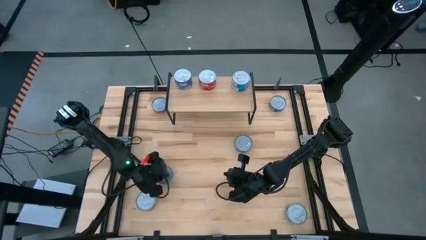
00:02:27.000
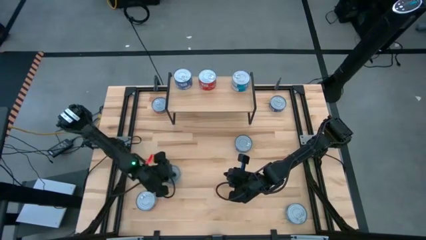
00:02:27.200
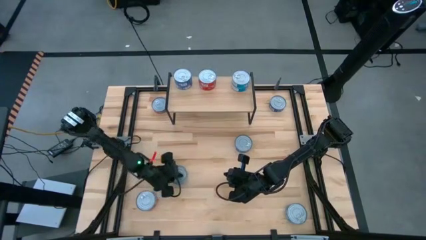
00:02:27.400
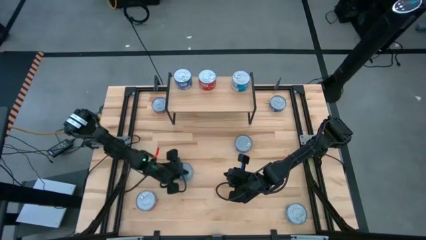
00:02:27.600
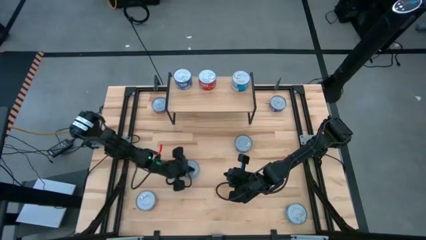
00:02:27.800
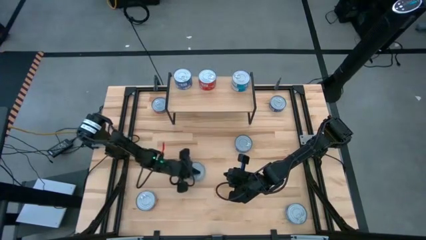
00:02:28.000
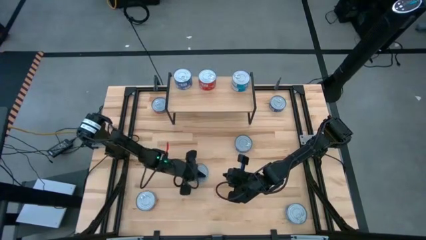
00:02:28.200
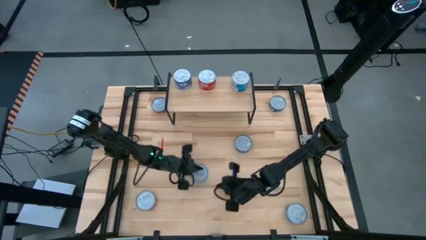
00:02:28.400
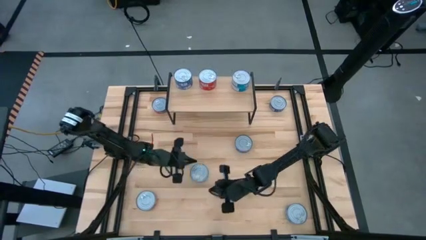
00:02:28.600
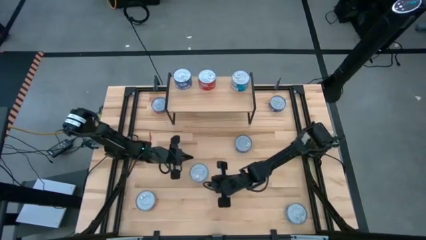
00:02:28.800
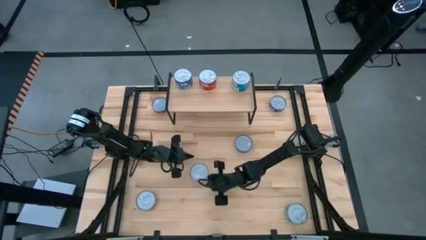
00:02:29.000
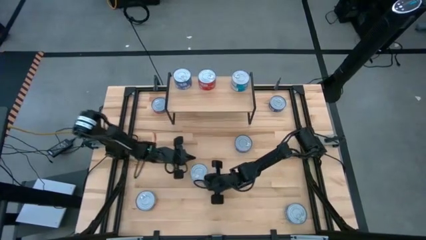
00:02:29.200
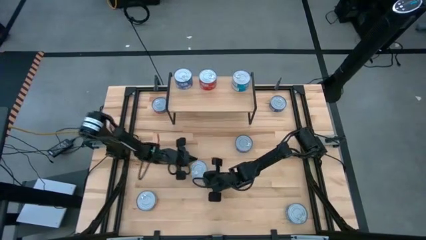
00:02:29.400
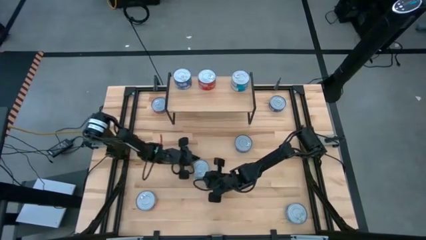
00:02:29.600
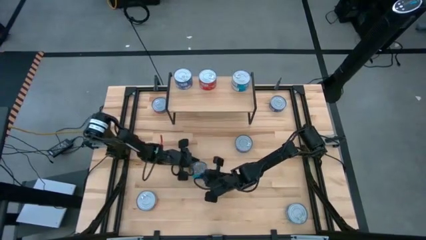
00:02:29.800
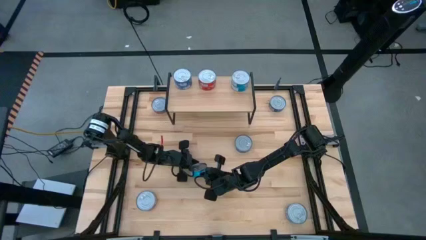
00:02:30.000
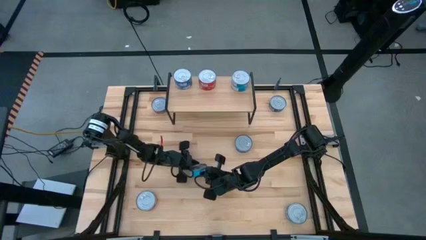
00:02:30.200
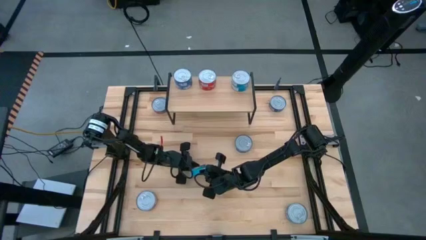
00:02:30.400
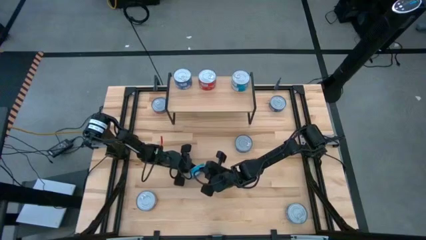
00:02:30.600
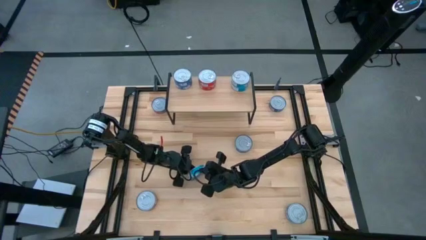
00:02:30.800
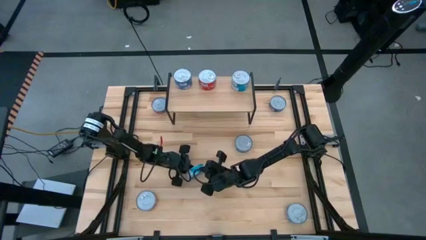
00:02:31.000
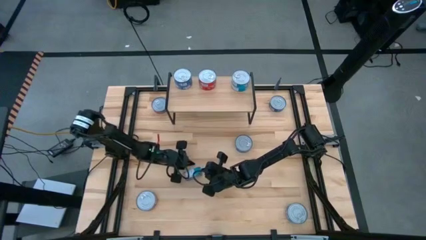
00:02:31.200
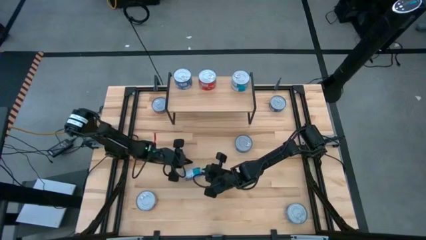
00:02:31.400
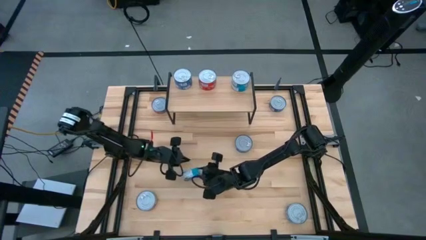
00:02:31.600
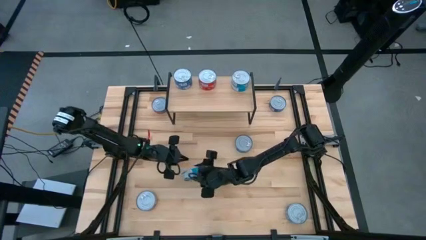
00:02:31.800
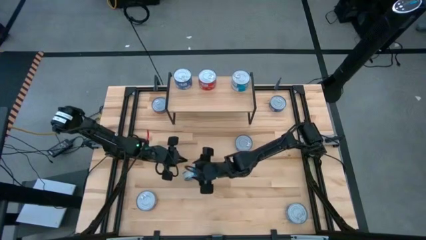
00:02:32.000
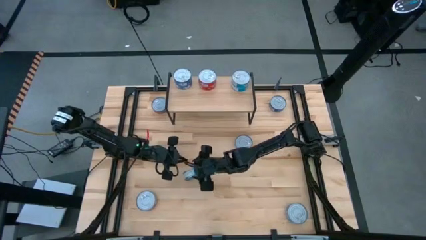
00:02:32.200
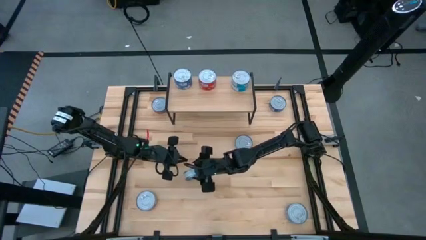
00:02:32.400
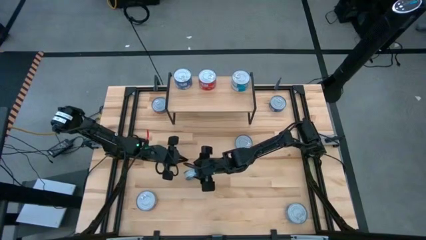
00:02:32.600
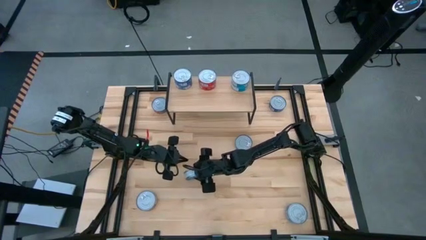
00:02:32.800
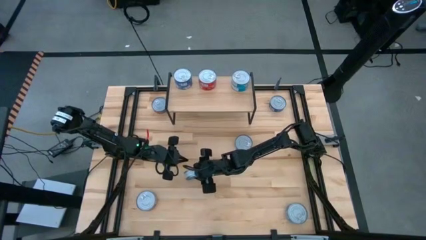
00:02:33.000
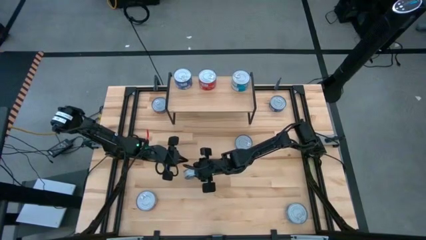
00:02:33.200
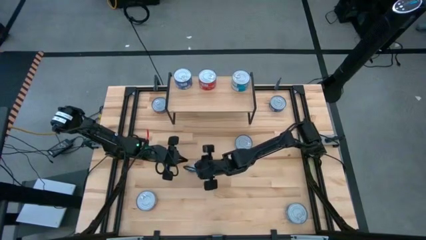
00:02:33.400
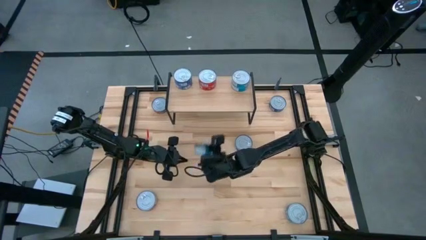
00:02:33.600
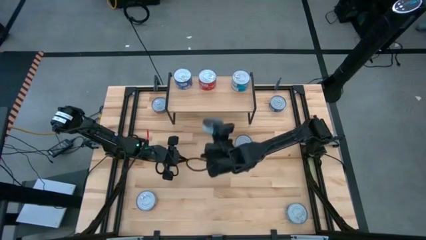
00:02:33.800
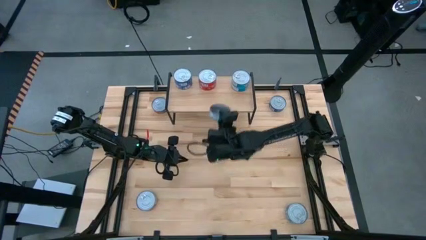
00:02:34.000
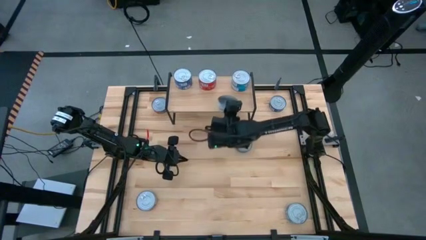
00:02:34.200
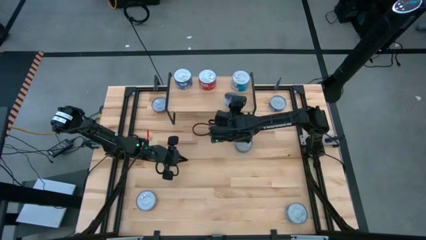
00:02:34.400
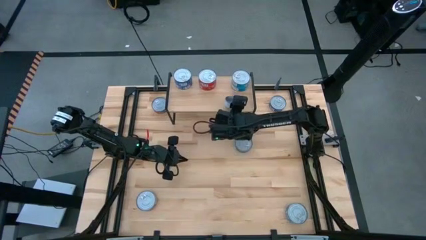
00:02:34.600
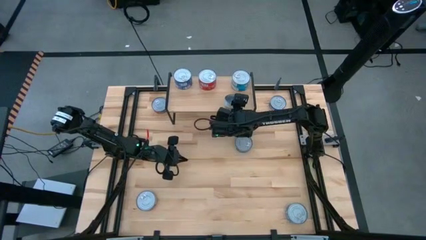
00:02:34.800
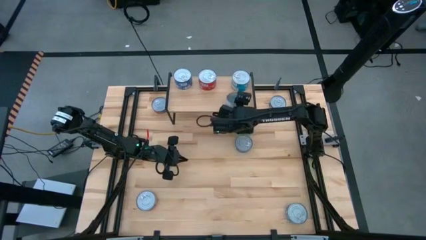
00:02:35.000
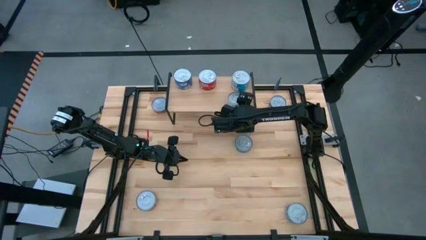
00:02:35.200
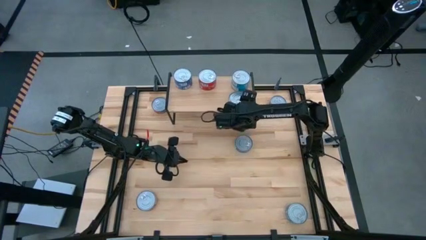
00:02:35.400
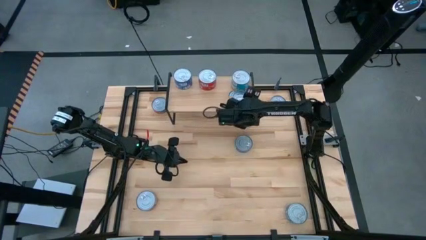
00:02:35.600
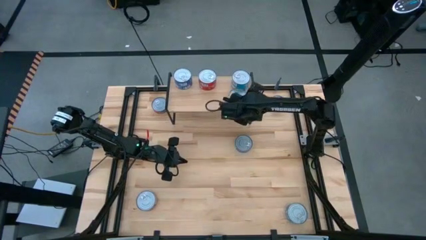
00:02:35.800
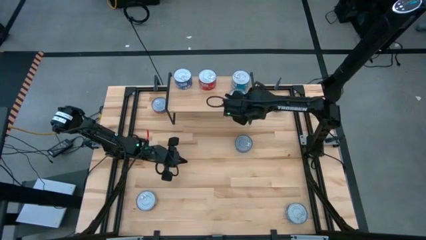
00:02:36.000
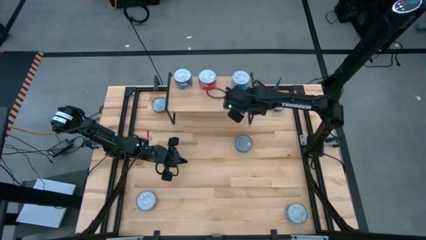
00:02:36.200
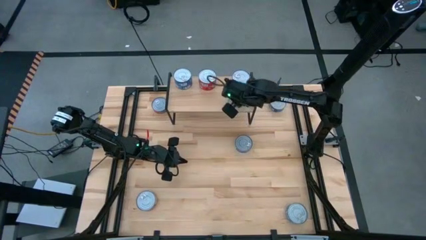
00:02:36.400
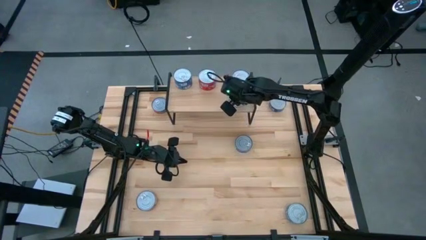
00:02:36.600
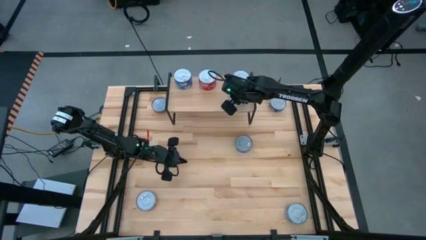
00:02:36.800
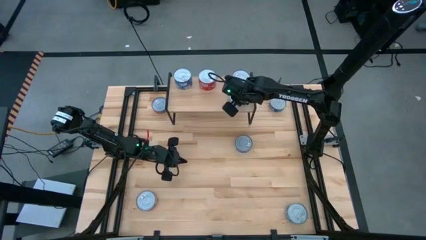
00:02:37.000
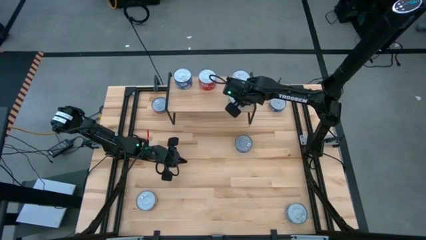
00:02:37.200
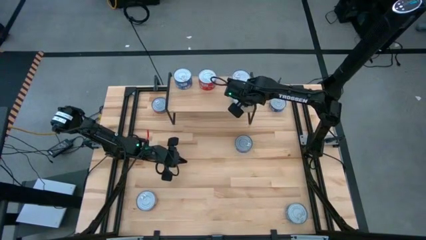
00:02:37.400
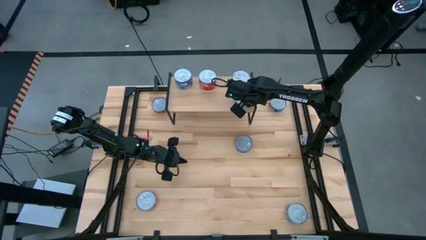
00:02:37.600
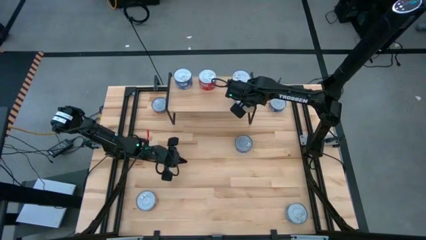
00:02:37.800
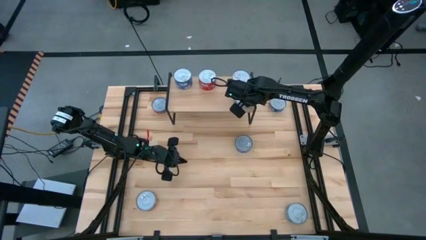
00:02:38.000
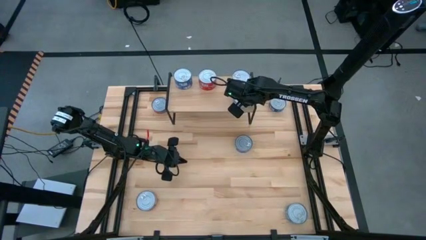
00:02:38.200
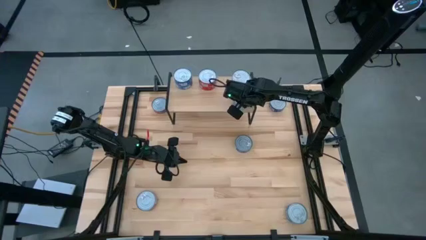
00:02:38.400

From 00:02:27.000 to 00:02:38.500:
Task: Stack canned seafood by type on shelf
Put the yellow blue tuna can on the shelf aligned with the other yellow blue tuna cans

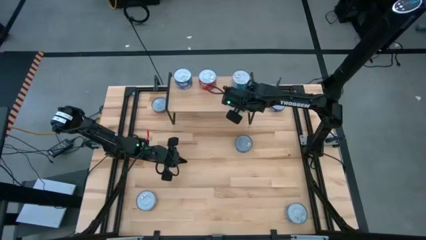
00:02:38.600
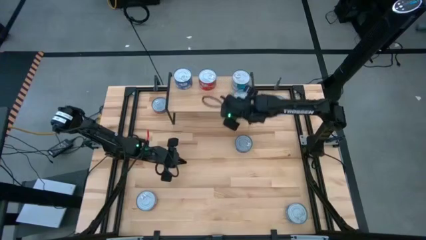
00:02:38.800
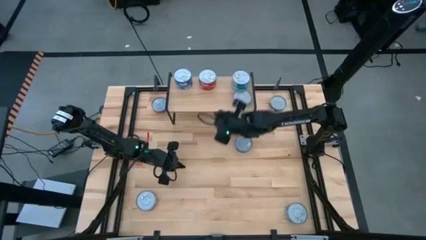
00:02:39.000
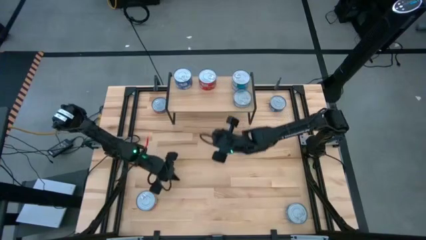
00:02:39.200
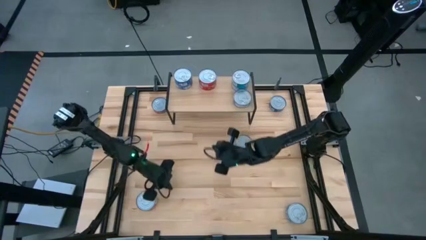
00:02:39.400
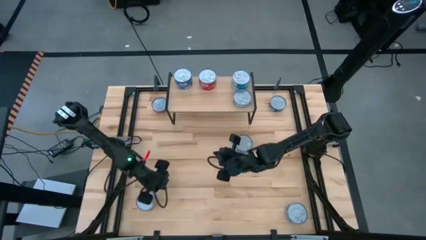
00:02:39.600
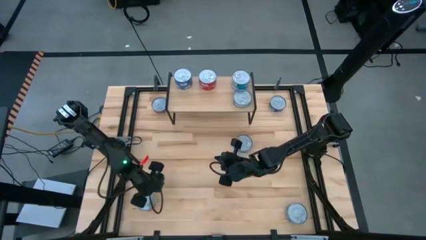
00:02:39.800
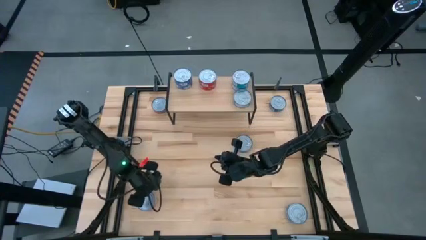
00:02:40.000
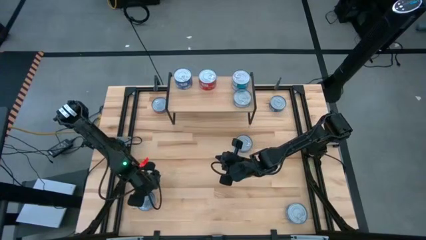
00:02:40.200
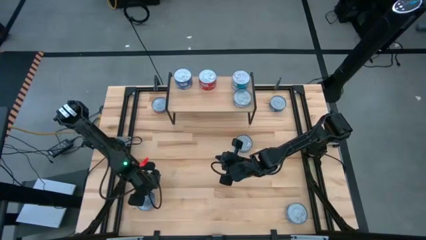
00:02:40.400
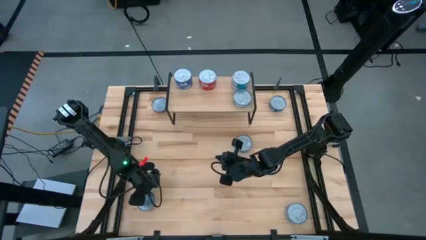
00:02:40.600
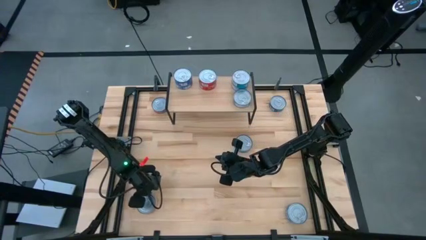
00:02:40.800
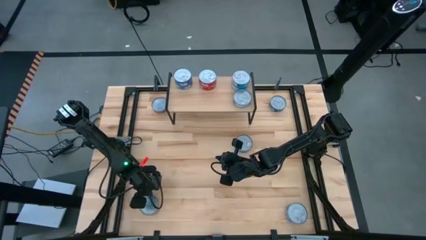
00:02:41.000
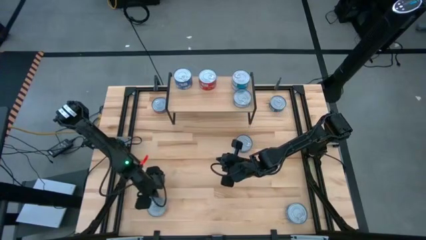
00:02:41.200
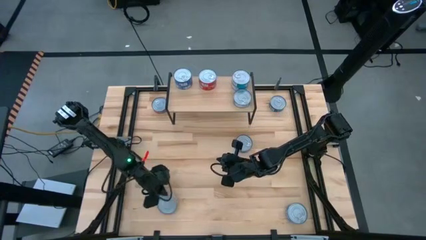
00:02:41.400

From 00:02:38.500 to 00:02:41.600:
Put the red tuna can on the shelf aligned with the other red tuna cans
